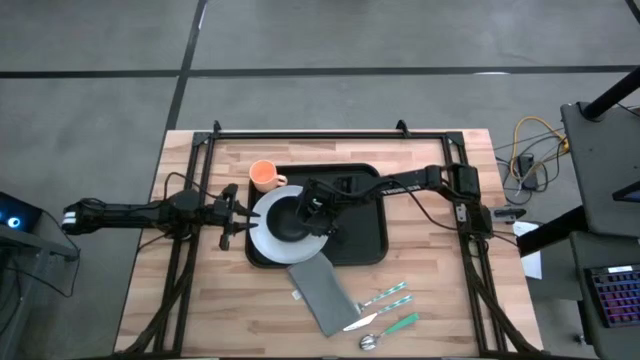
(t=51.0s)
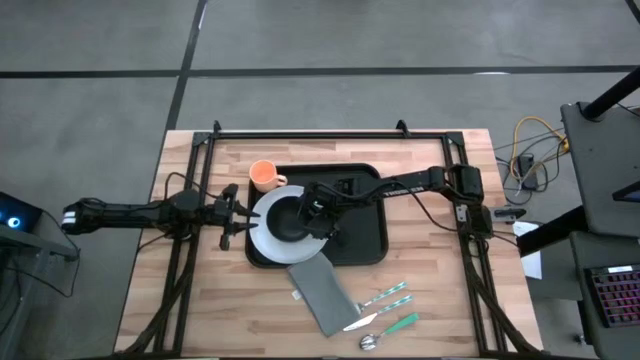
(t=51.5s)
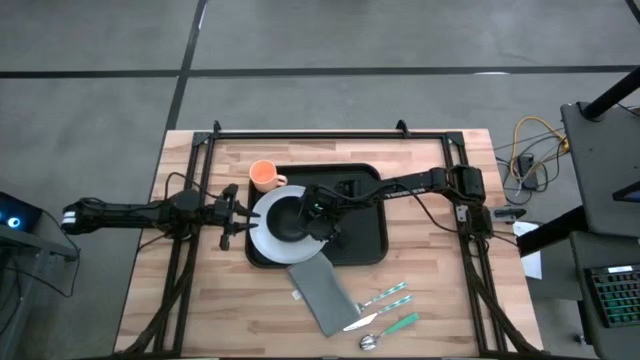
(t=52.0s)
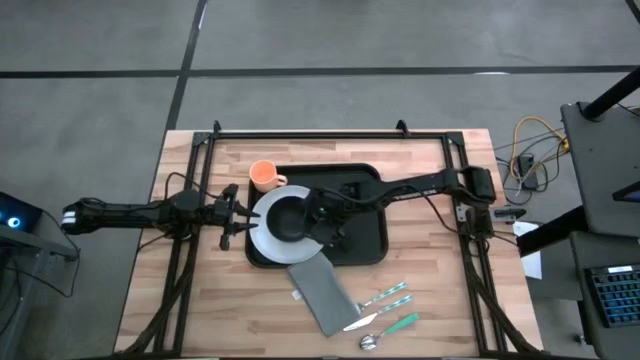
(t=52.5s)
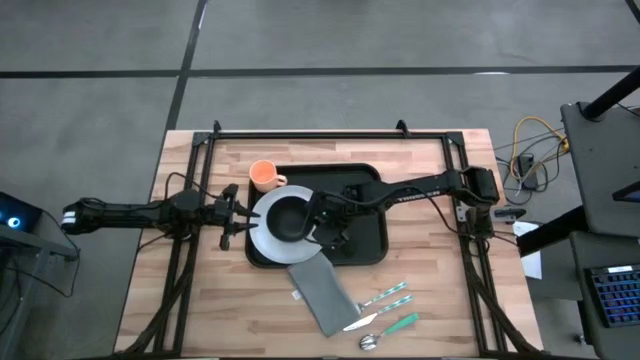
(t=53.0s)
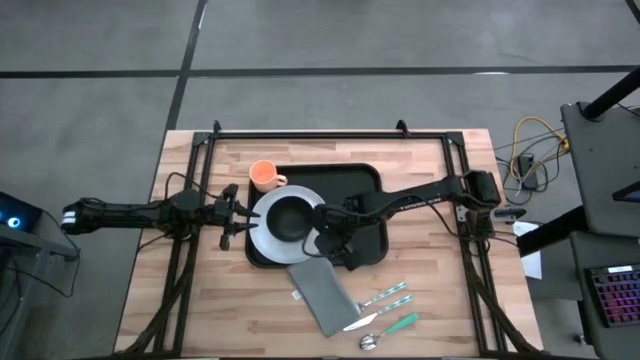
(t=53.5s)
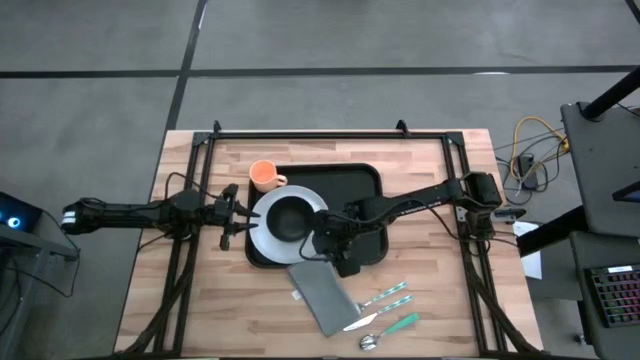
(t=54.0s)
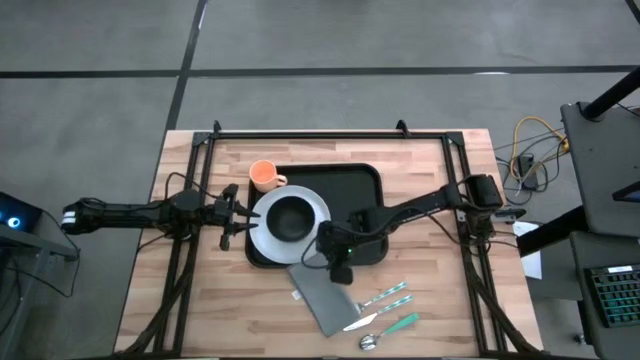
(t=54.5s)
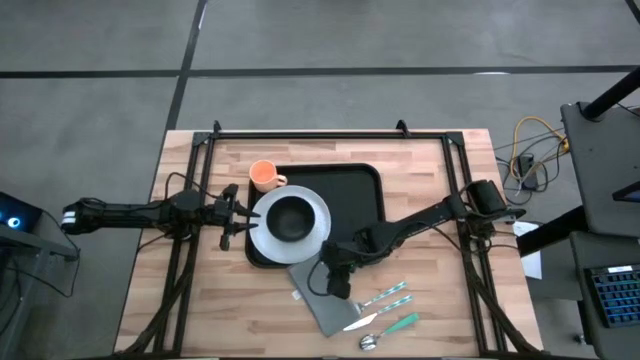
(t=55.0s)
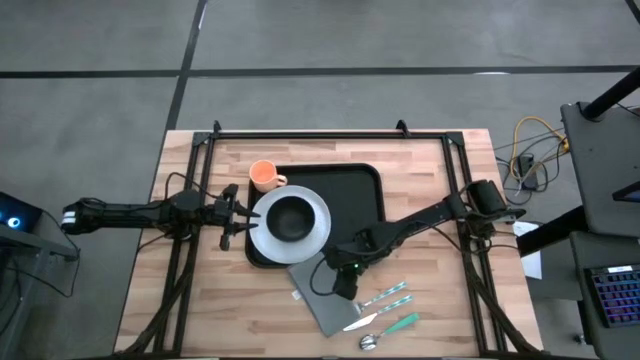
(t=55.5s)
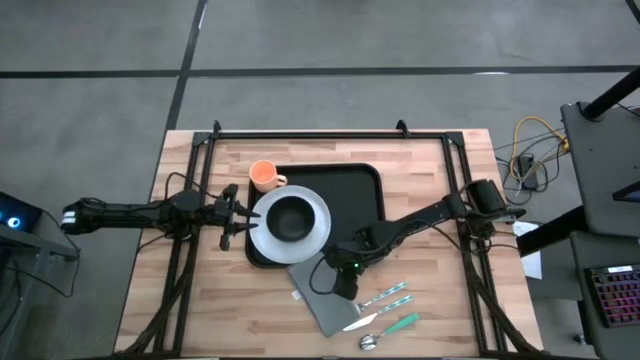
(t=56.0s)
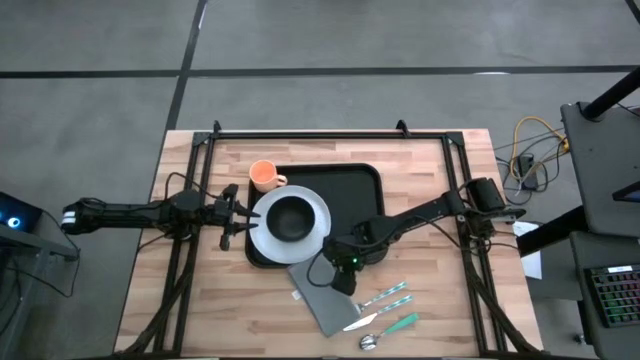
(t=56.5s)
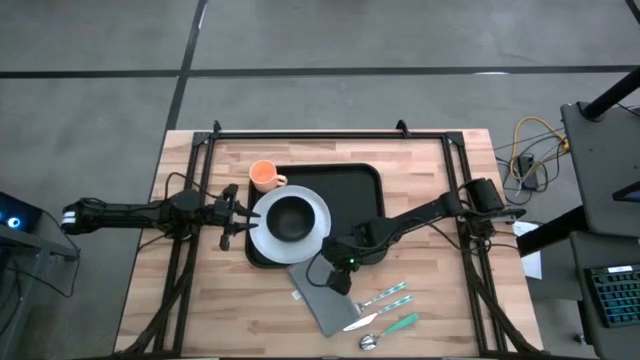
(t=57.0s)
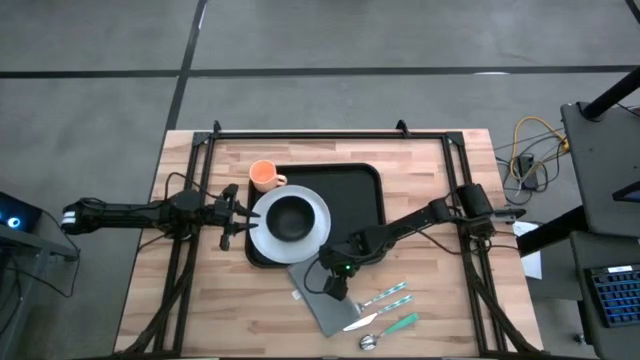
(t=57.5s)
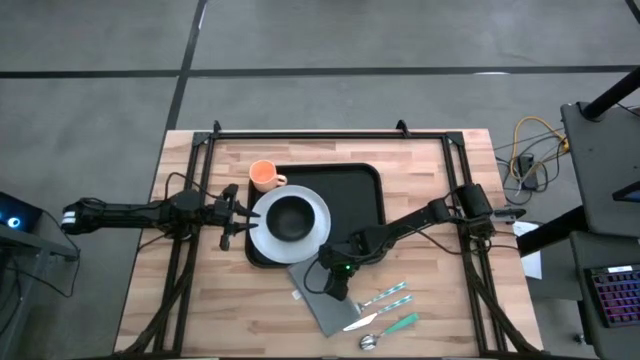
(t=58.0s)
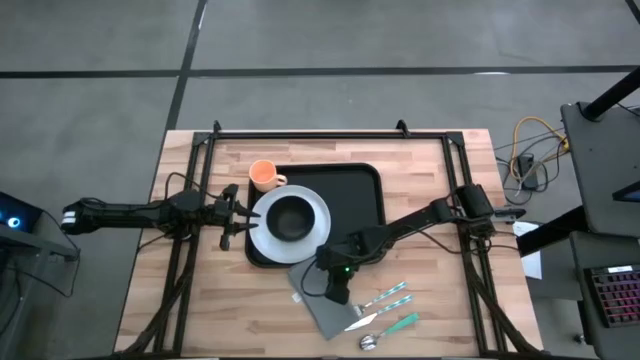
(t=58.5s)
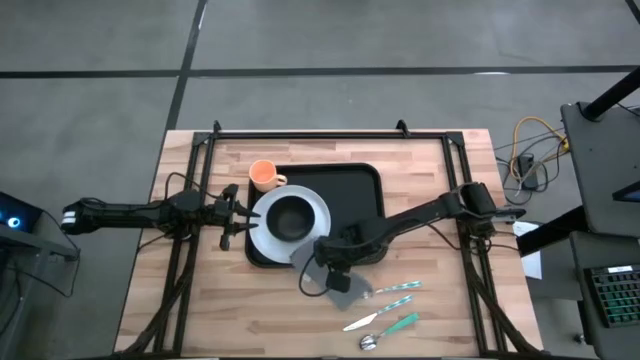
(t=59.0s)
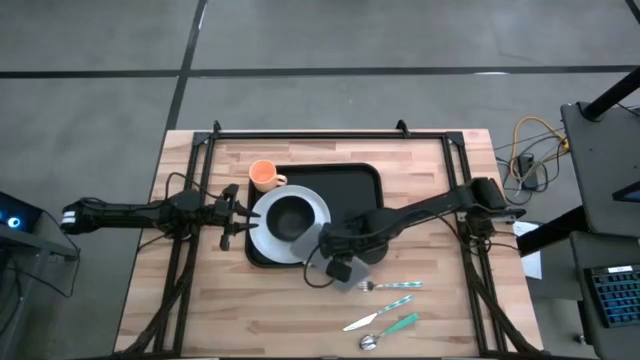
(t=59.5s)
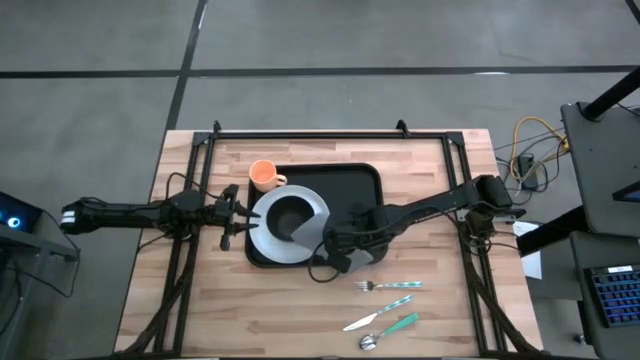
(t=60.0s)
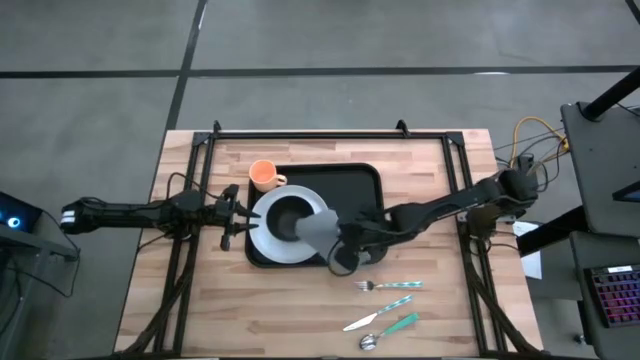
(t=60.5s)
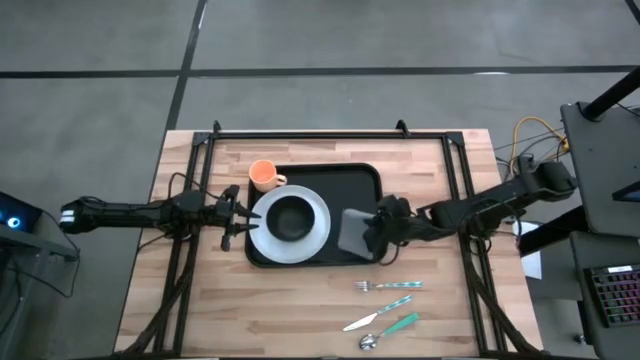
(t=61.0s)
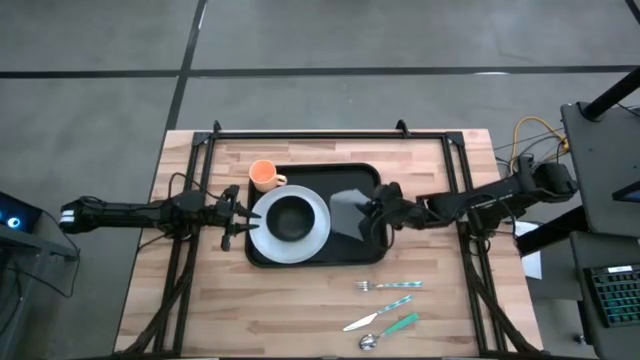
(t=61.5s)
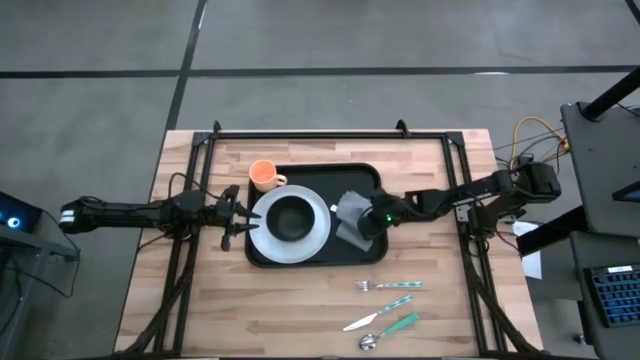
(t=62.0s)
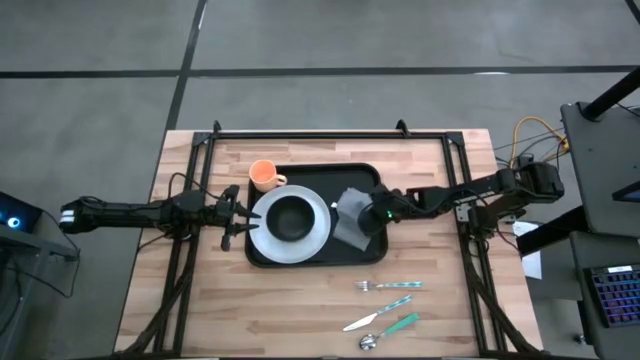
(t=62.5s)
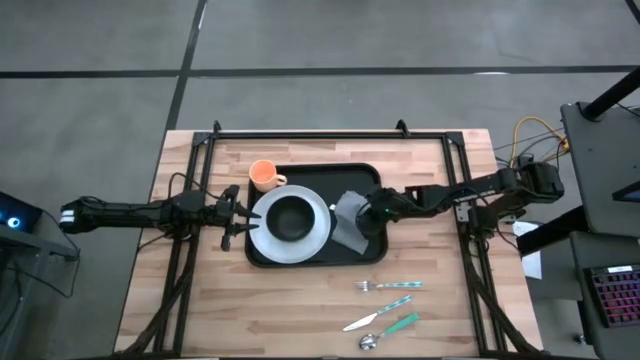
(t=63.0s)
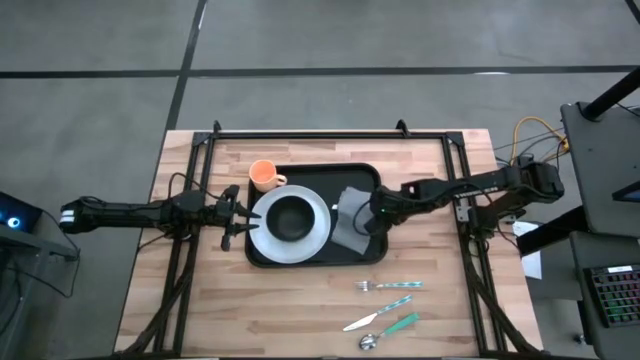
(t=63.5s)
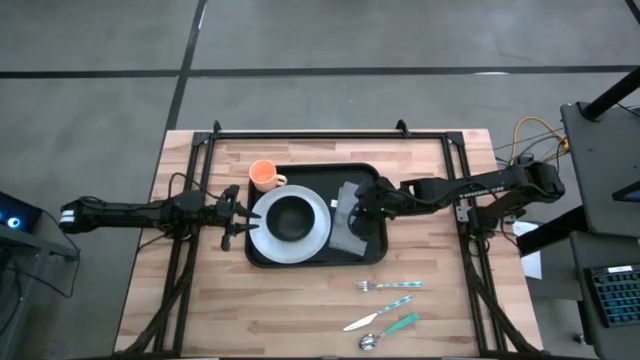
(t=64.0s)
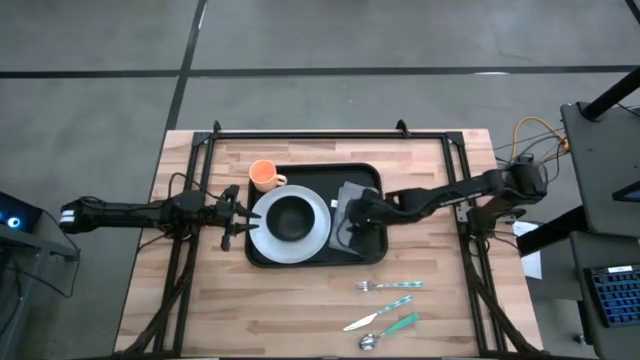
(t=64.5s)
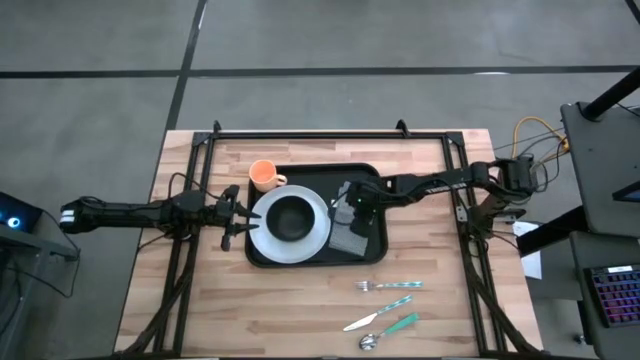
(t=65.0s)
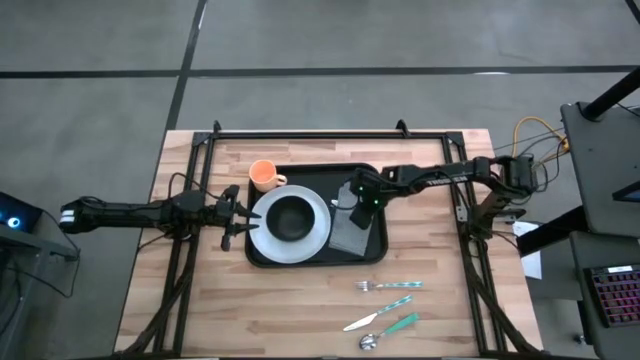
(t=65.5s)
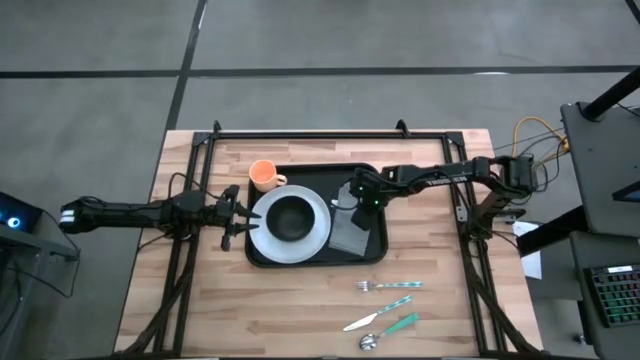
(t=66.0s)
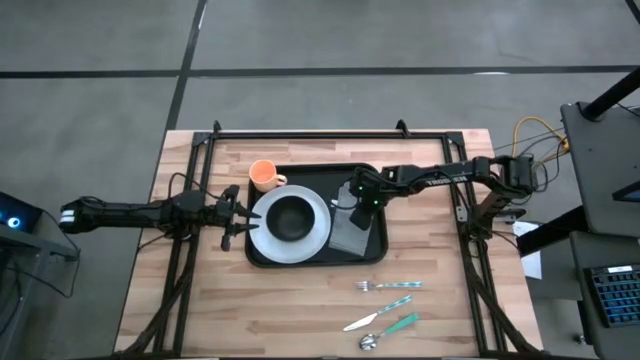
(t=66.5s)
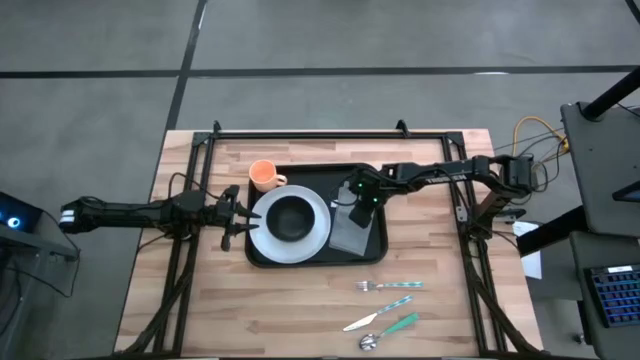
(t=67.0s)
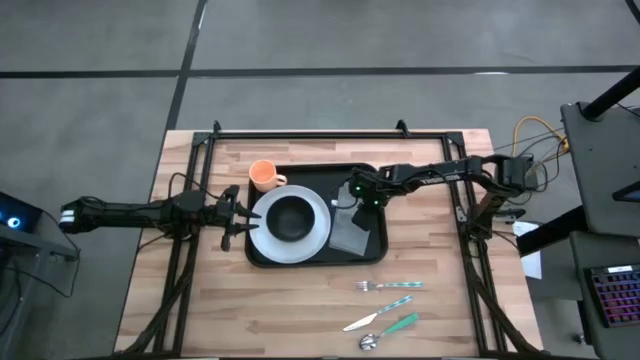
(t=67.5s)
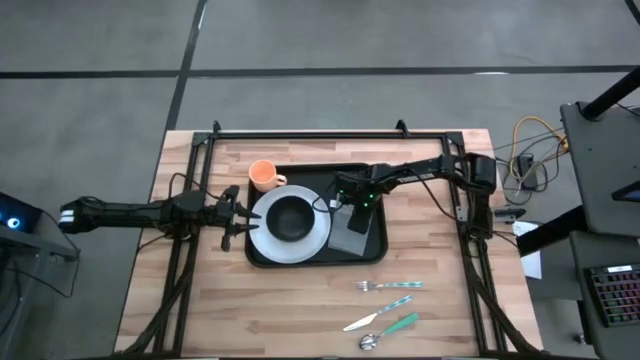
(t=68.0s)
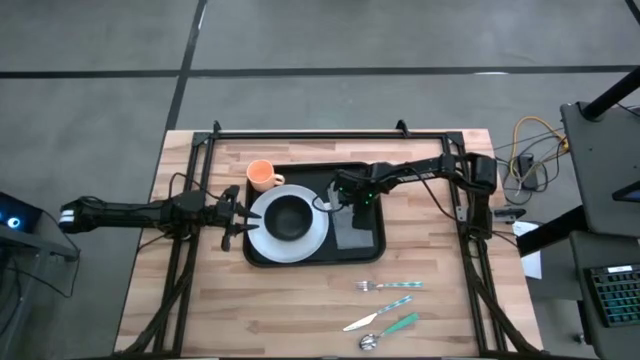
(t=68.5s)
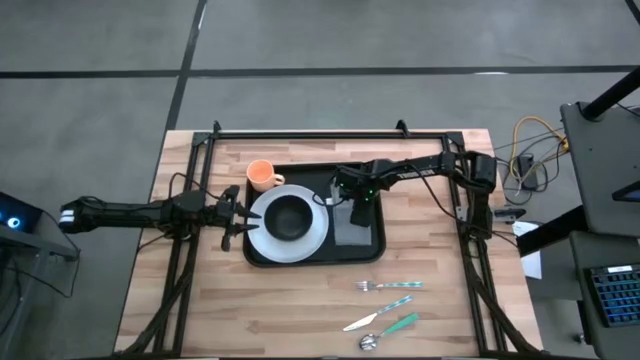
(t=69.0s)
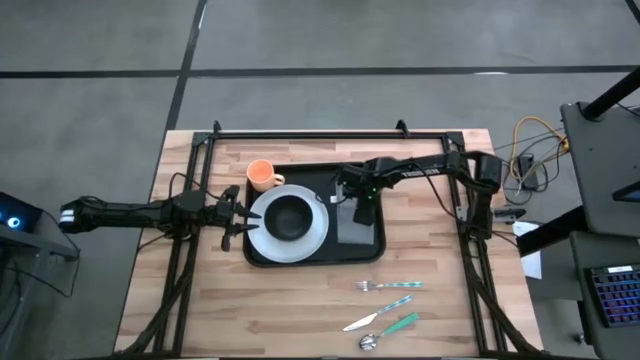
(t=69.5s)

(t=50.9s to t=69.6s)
Task: Set up tray
Put the gray napkin on the black tray
